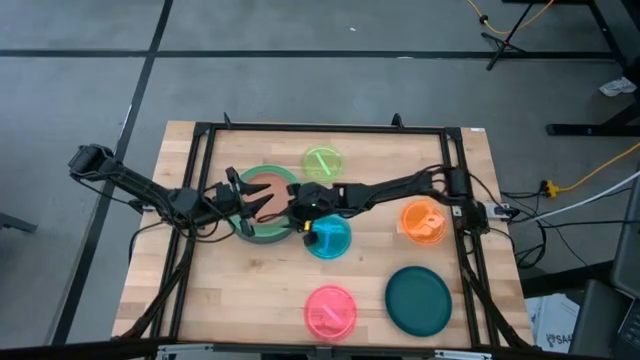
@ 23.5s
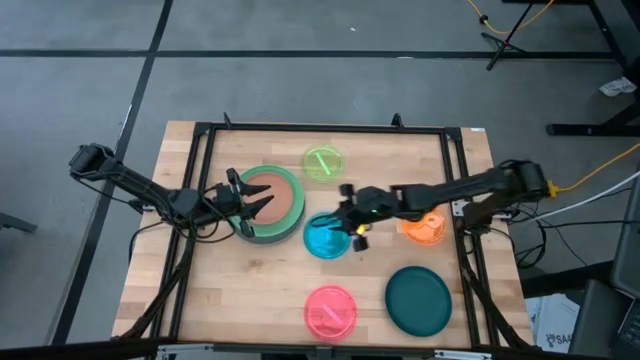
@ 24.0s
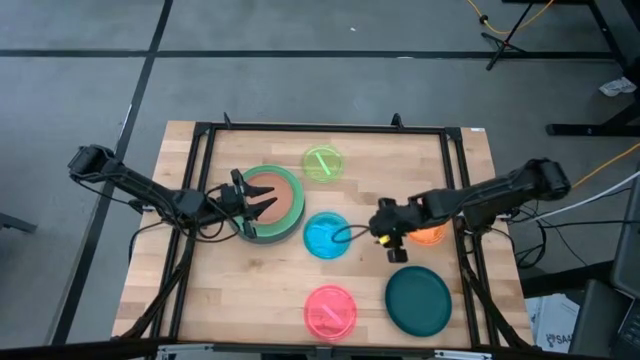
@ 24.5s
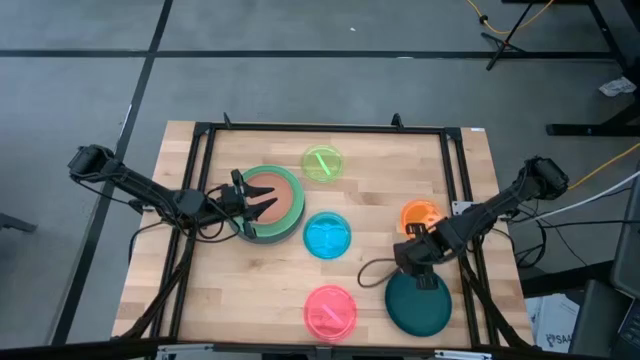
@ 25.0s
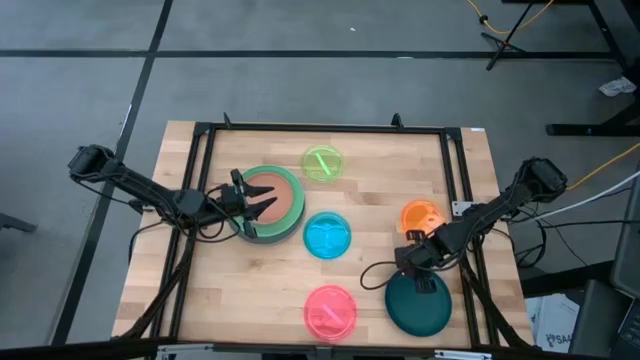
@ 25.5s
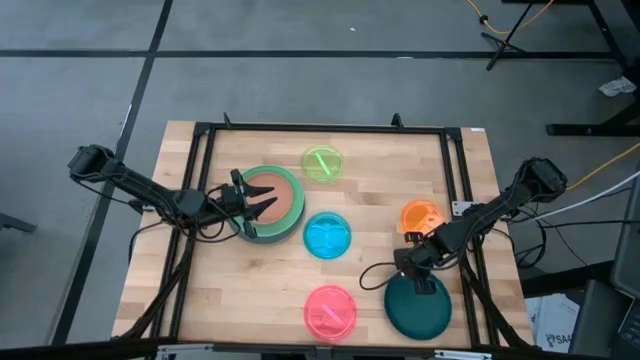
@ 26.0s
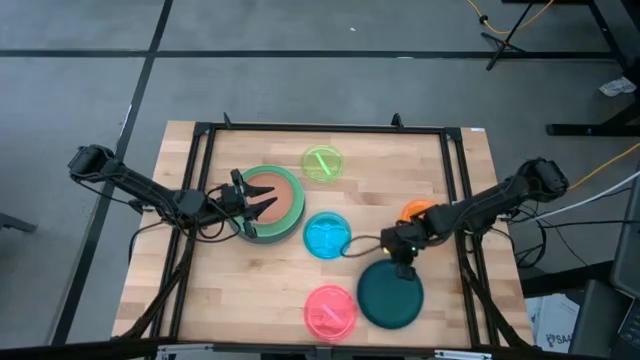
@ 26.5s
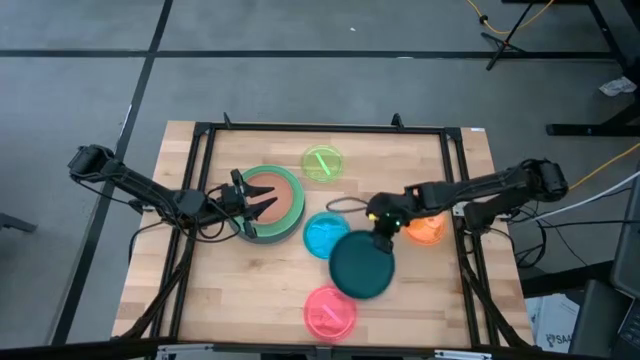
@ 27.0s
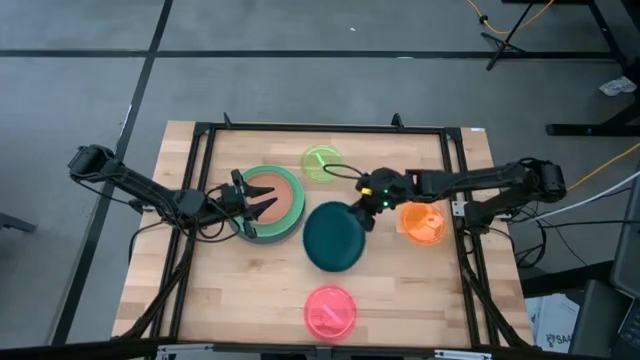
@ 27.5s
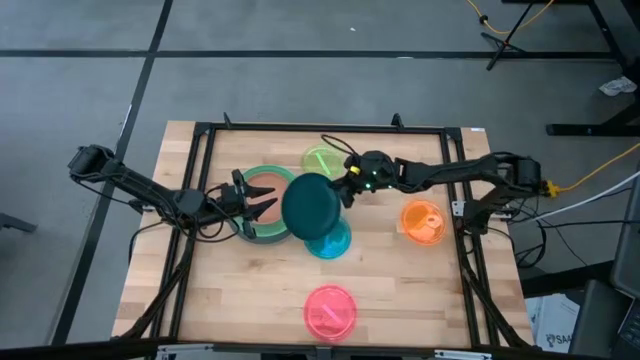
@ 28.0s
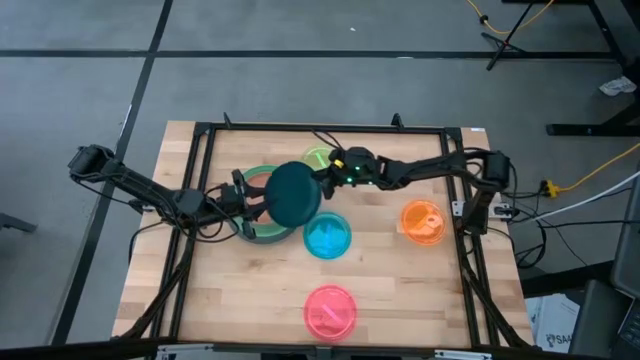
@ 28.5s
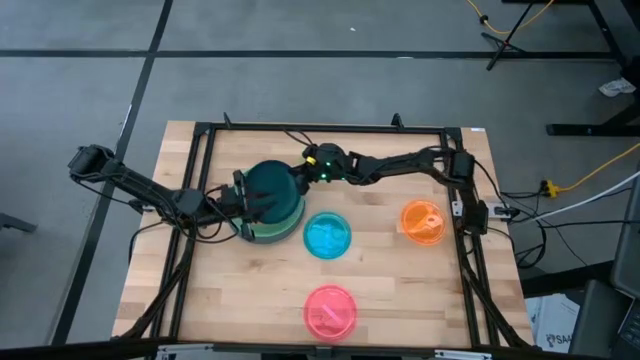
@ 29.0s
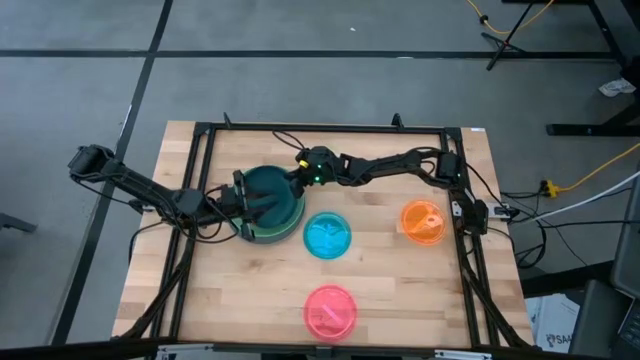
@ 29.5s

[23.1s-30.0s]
Task: Stack plastic plates
Stack the dark blue plate on top of brown plate

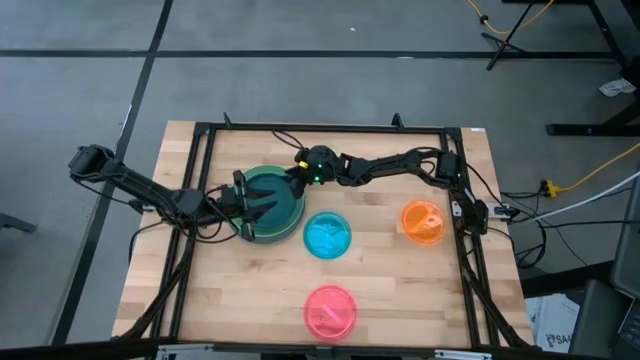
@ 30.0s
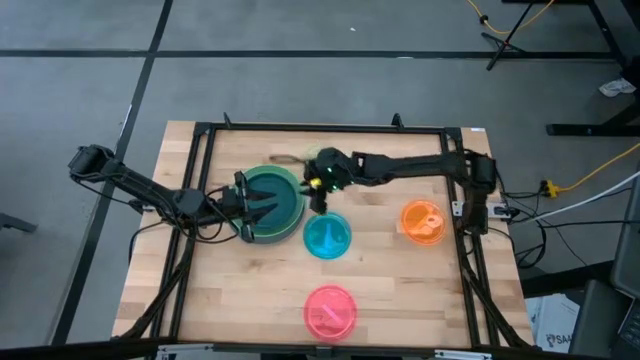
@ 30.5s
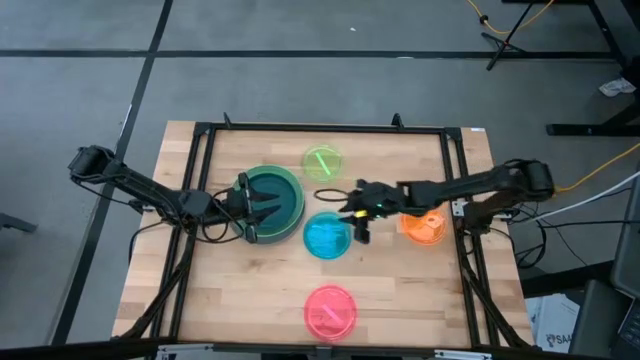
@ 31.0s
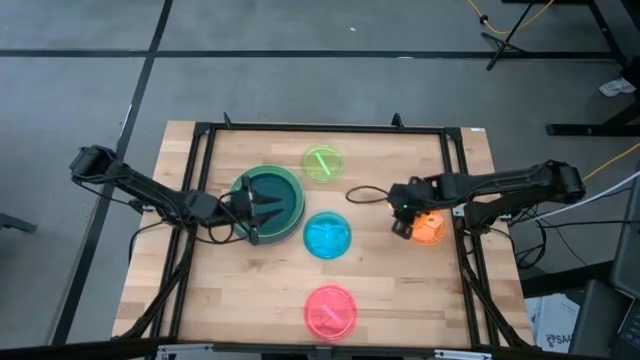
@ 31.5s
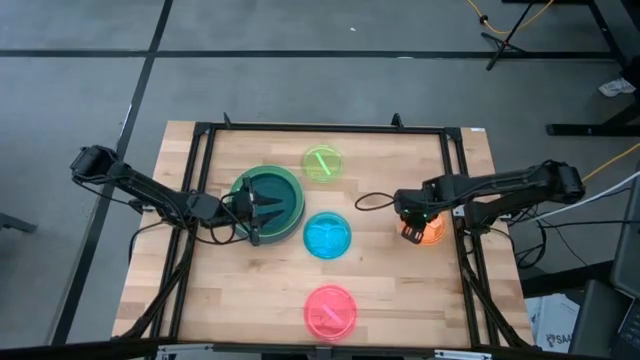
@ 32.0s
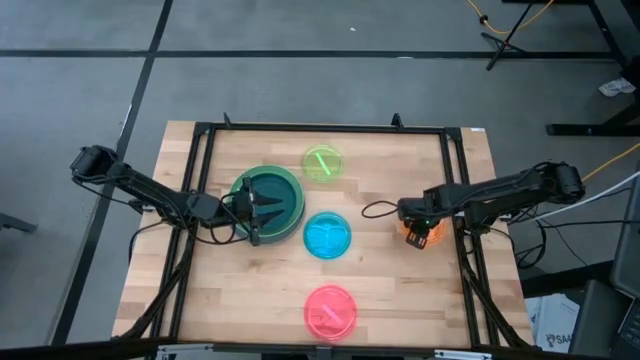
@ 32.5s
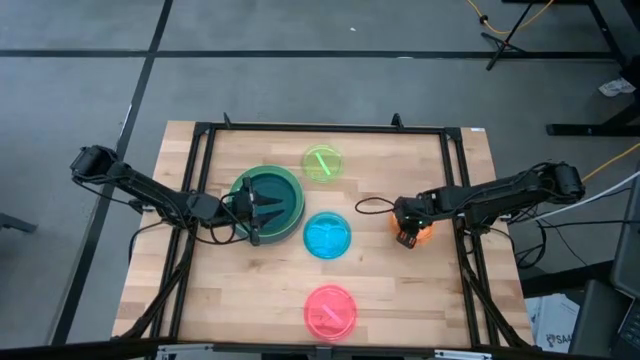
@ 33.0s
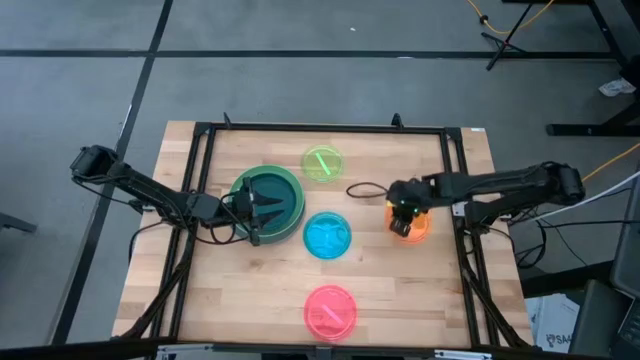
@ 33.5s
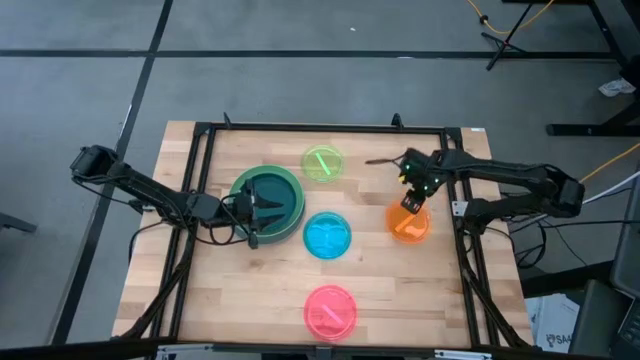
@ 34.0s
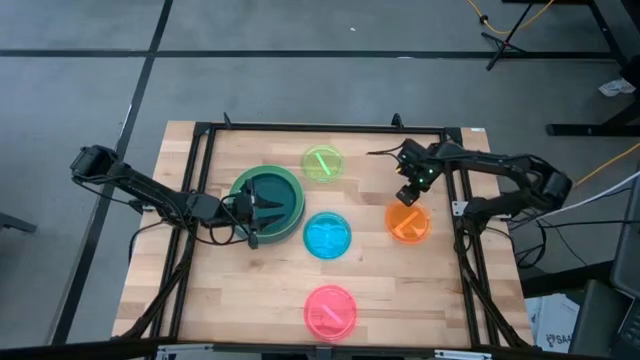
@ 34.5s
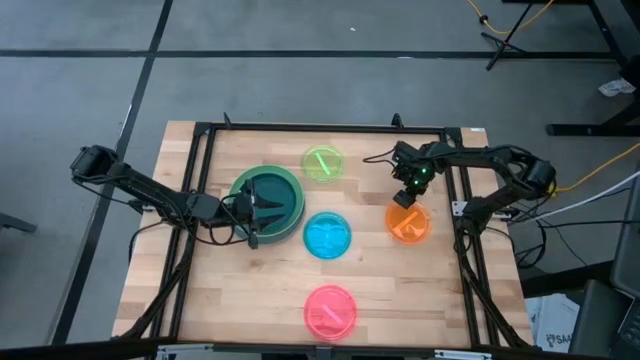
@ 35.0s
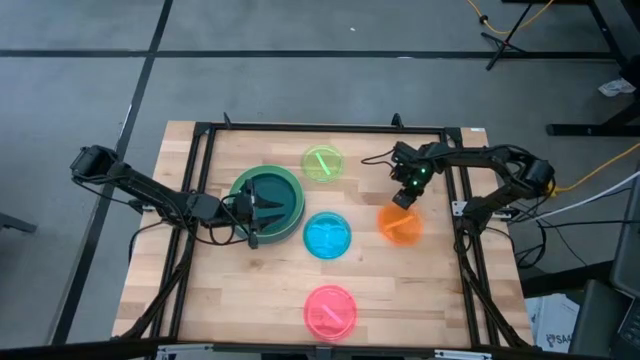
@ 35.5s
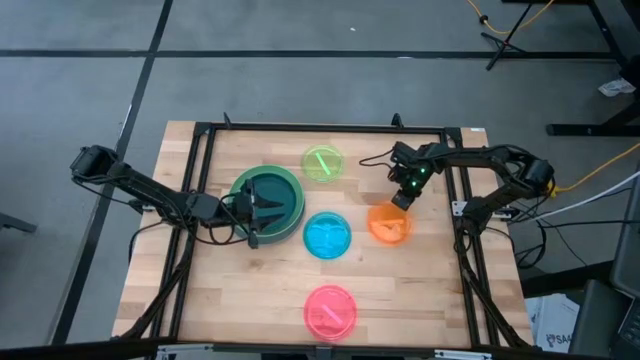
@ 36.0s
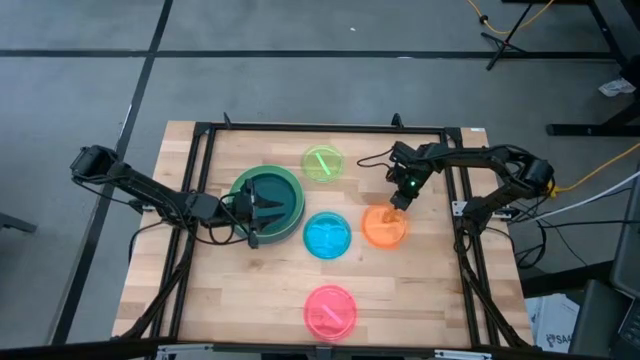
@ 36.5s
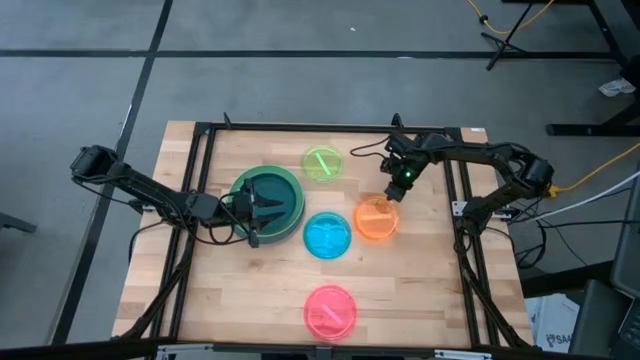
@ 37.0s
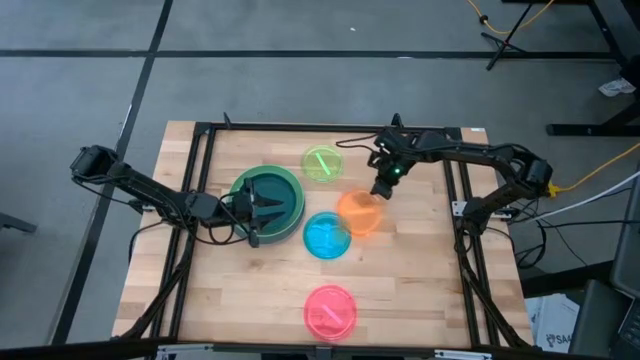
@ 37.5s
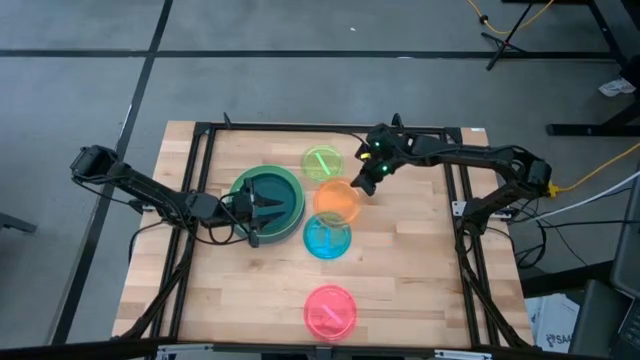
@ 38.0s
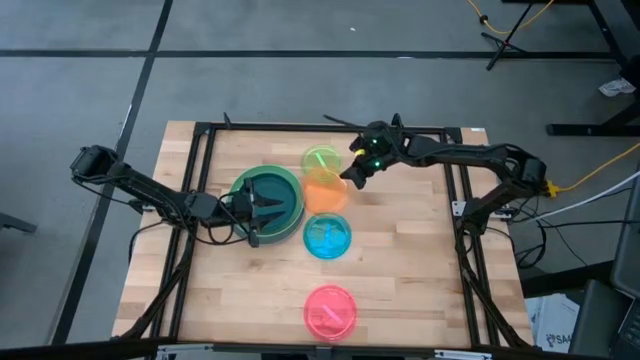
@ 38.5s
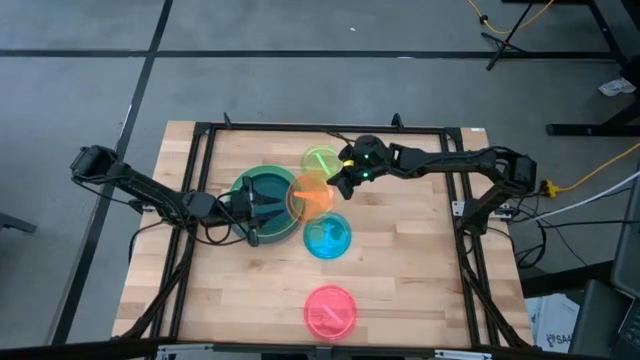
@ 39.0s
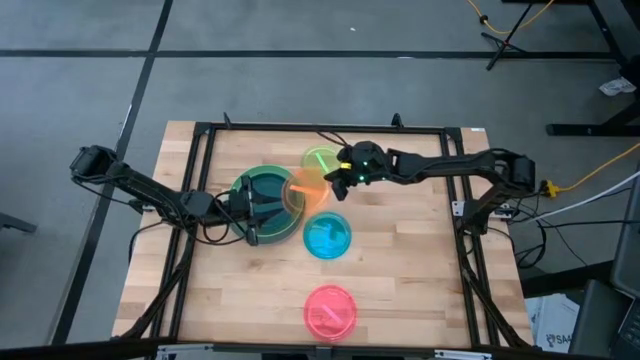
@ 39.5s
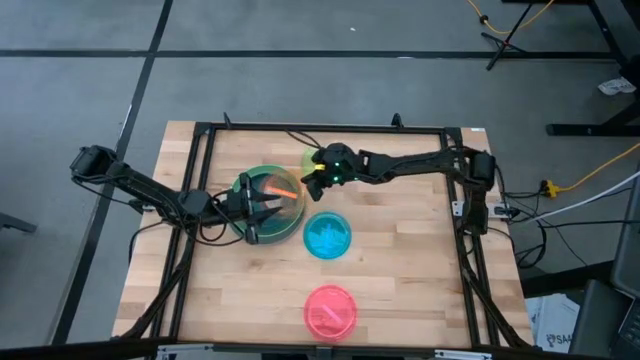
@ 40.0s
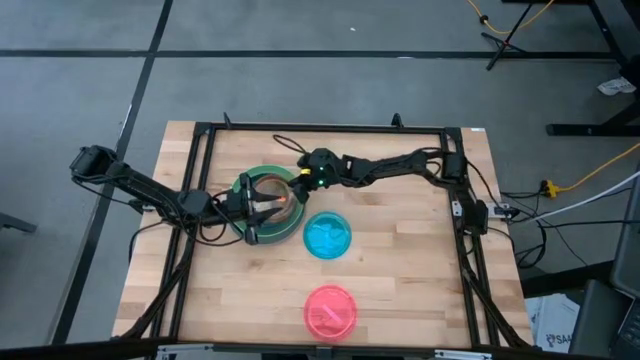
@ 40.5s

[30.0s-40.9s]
Stack the orange plate on top of dark blue plate

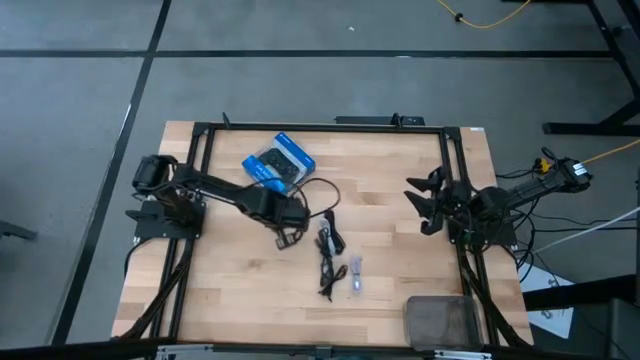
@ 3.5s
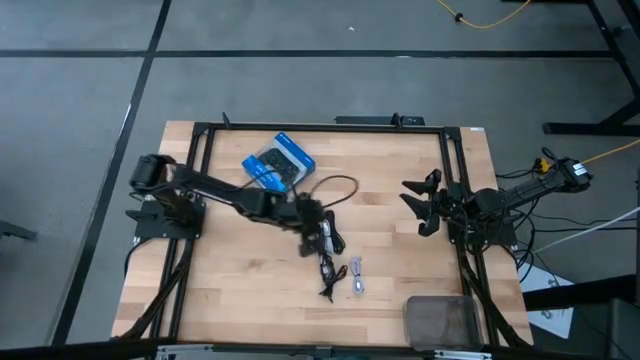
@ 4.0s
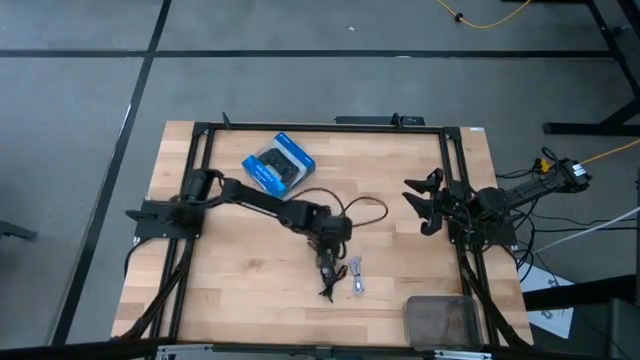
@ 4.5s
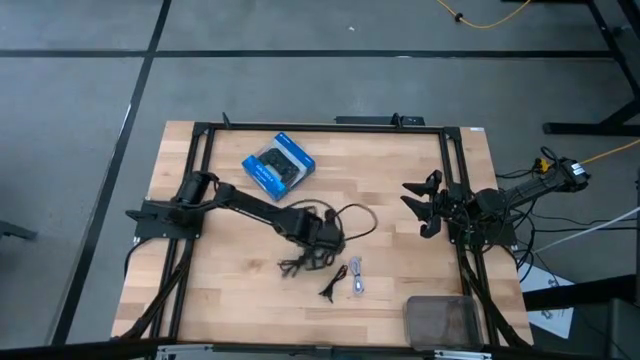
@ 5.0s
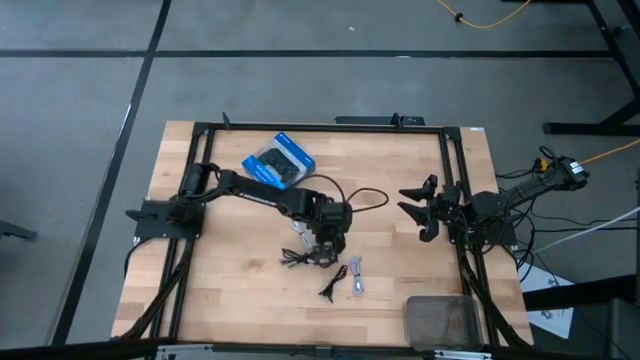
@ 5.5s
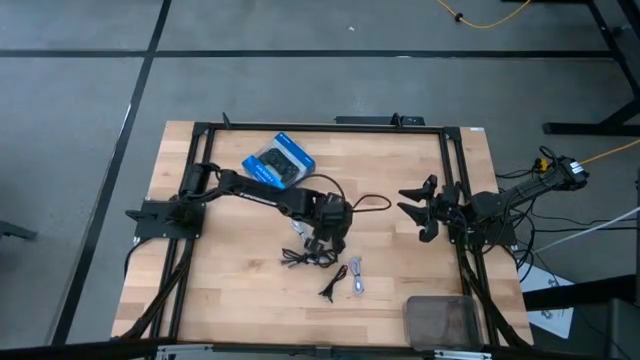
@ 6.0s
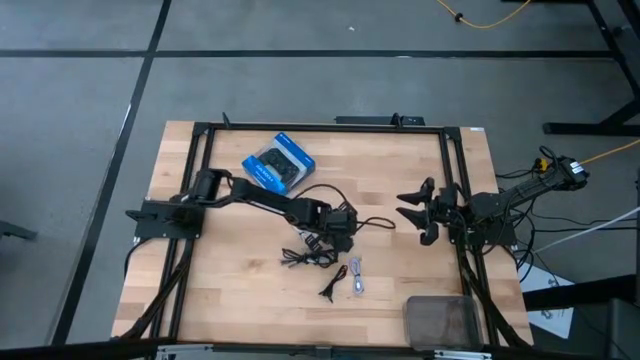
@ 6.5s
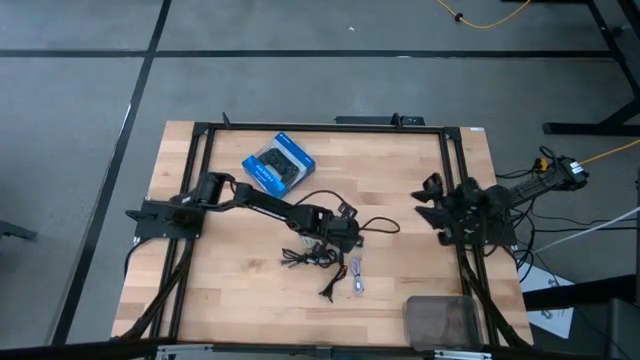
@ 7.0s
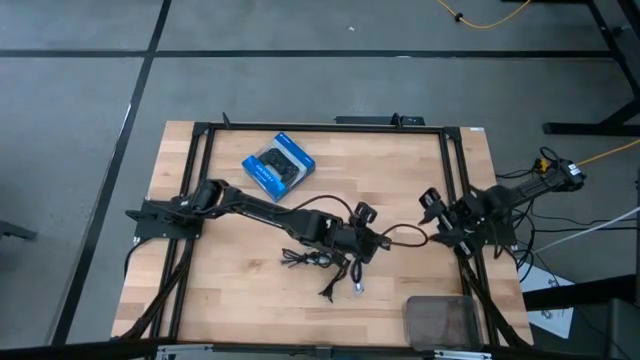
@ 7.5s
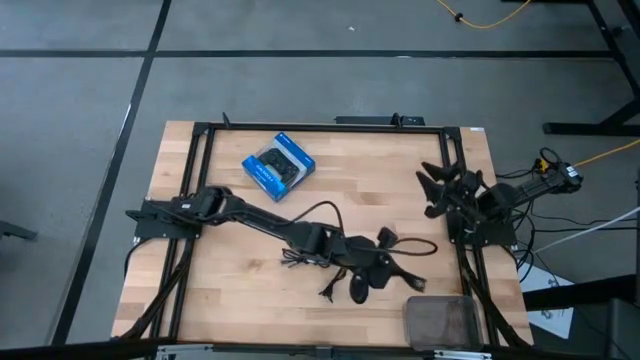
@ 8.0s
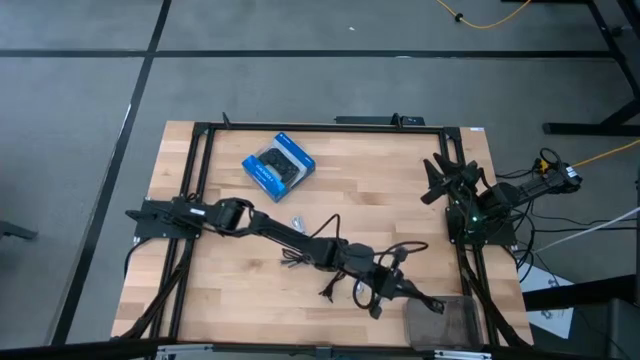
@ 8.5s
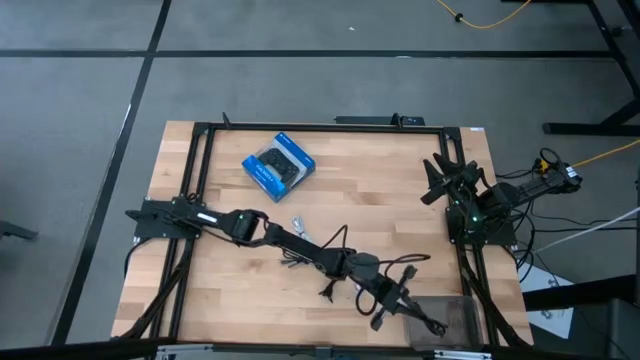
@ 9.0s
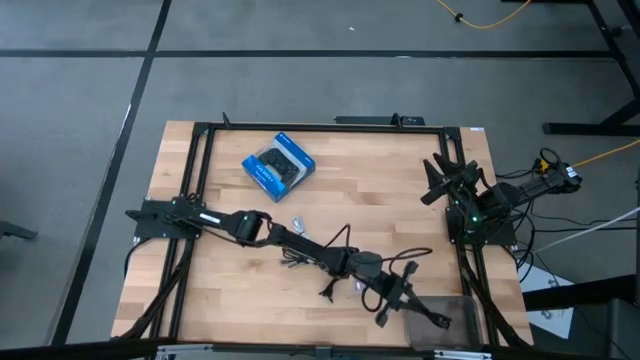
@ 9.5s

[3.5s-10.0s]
Task: Pick and place USB-C Cables
Put the top black charger cable into the black bin
